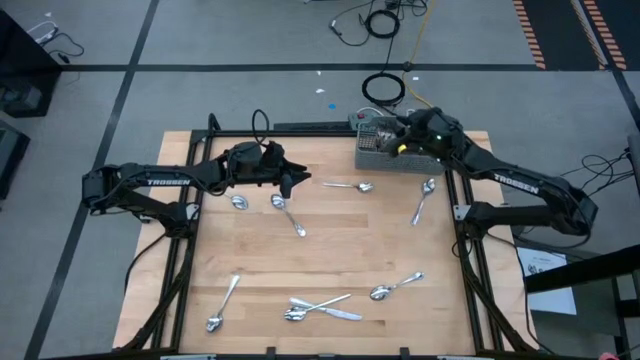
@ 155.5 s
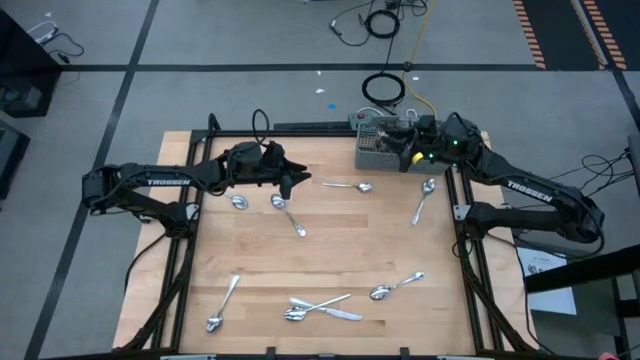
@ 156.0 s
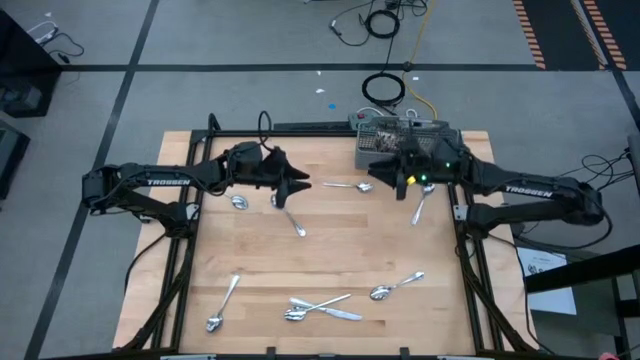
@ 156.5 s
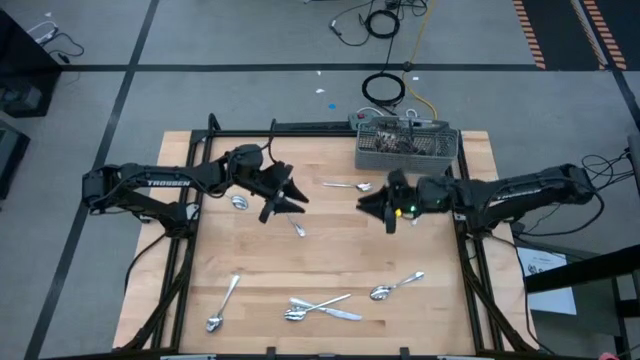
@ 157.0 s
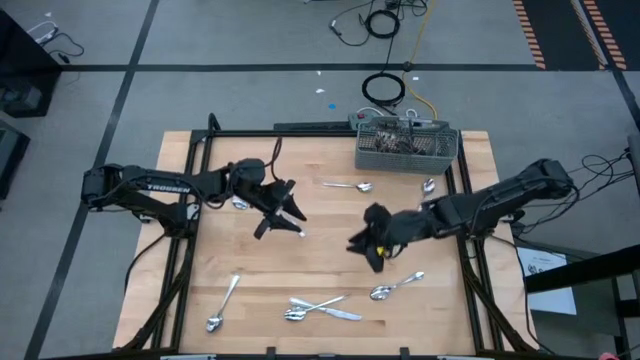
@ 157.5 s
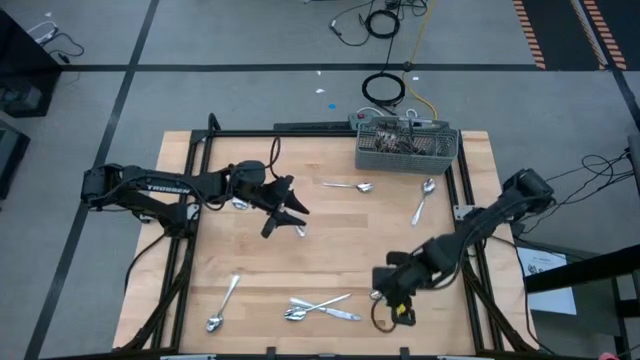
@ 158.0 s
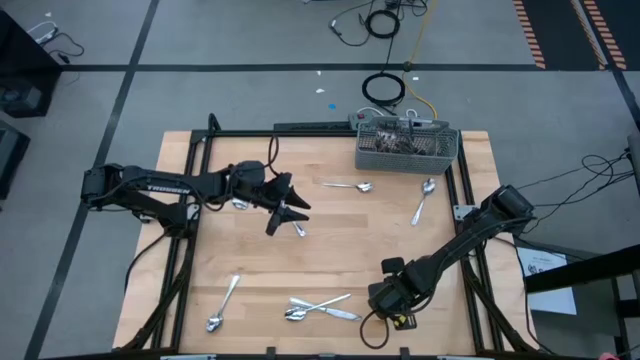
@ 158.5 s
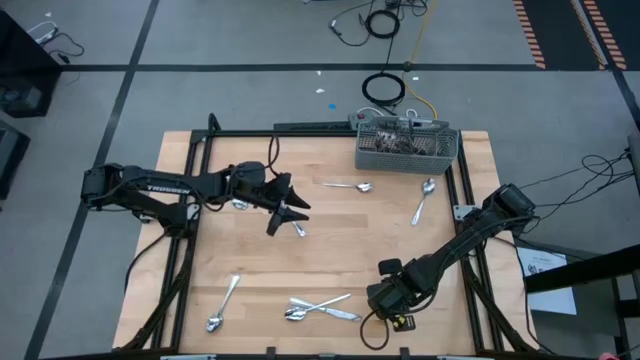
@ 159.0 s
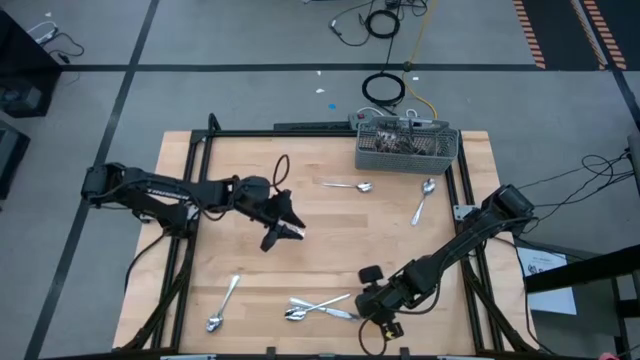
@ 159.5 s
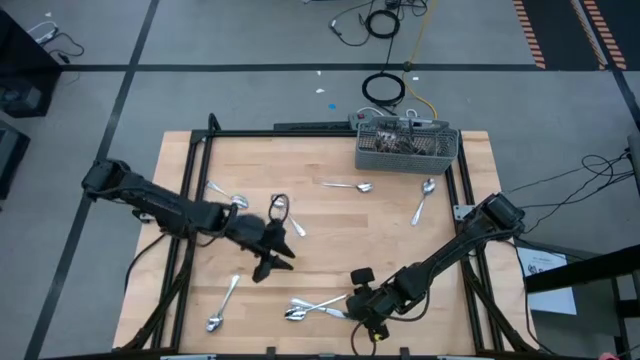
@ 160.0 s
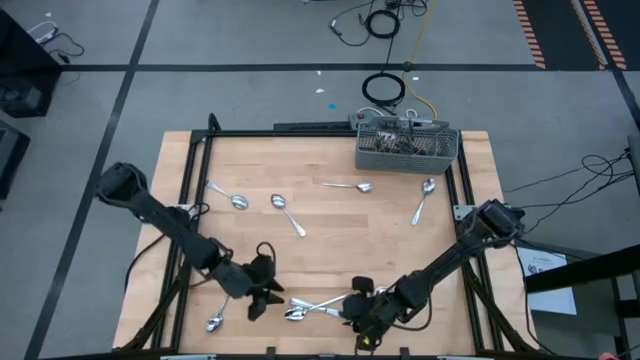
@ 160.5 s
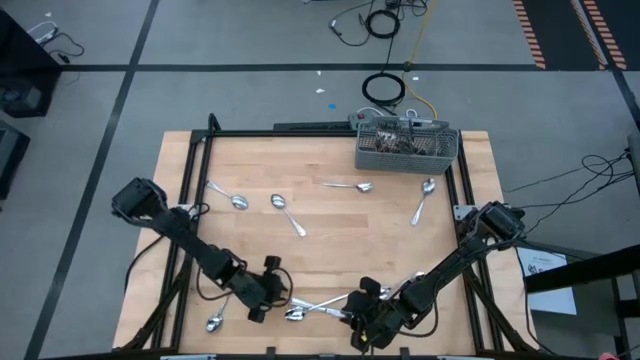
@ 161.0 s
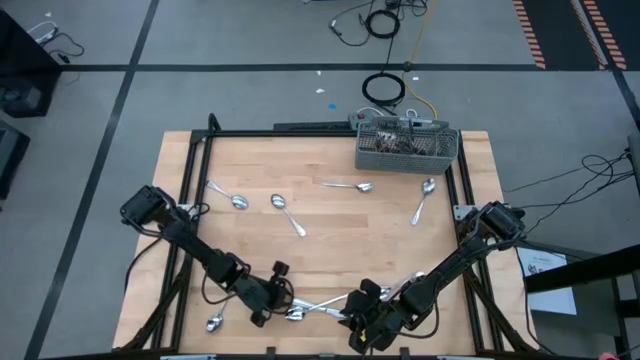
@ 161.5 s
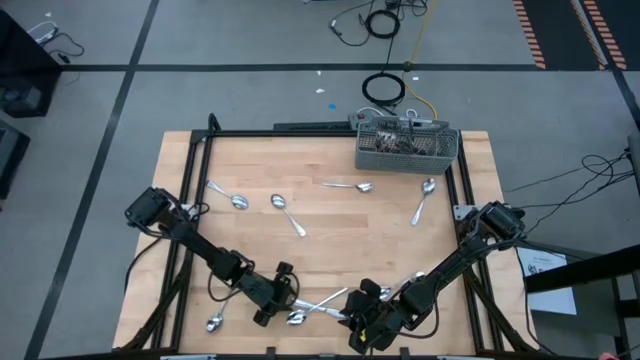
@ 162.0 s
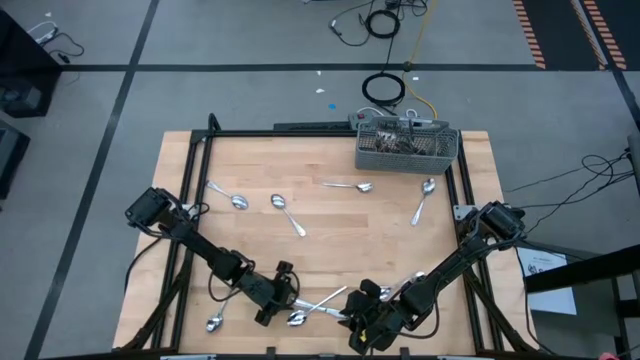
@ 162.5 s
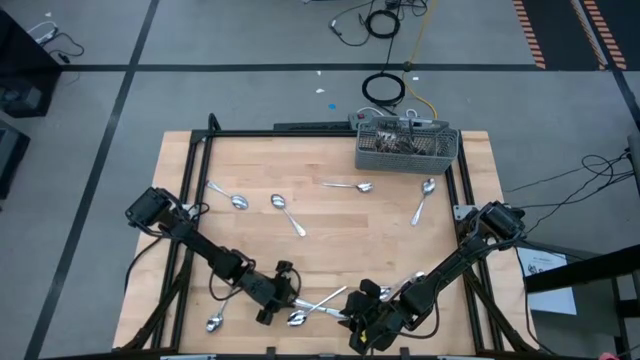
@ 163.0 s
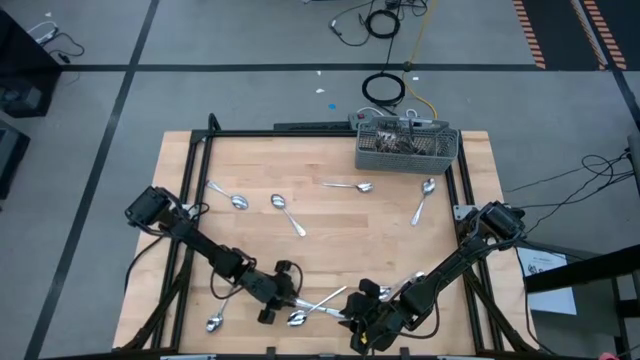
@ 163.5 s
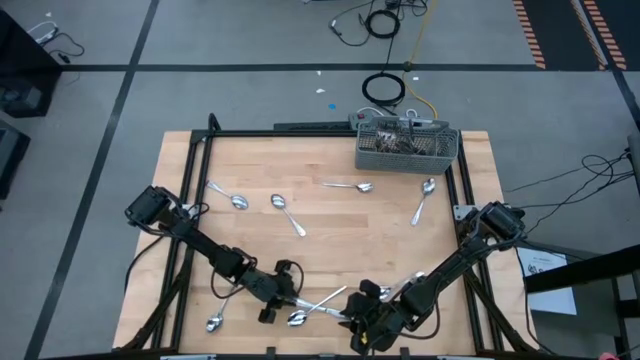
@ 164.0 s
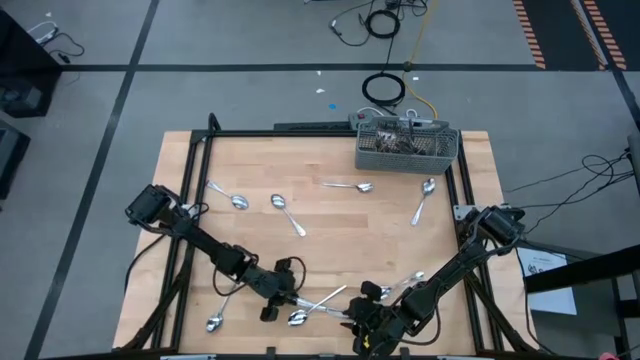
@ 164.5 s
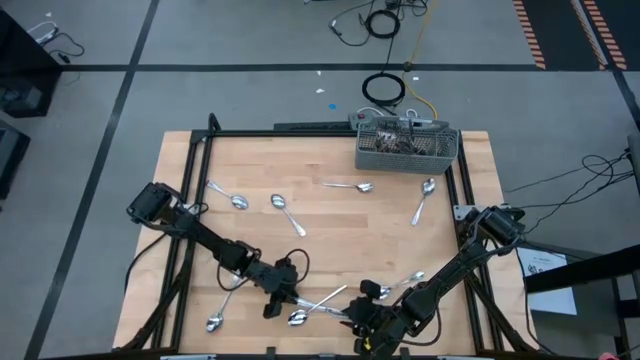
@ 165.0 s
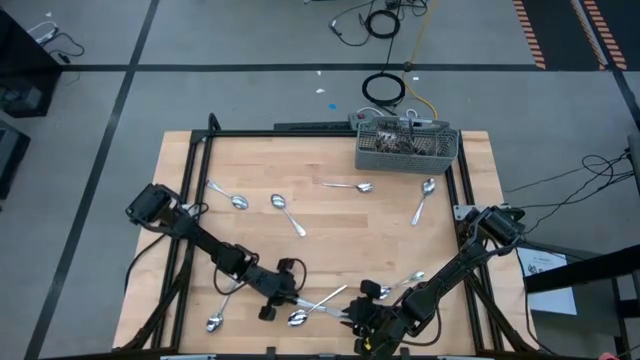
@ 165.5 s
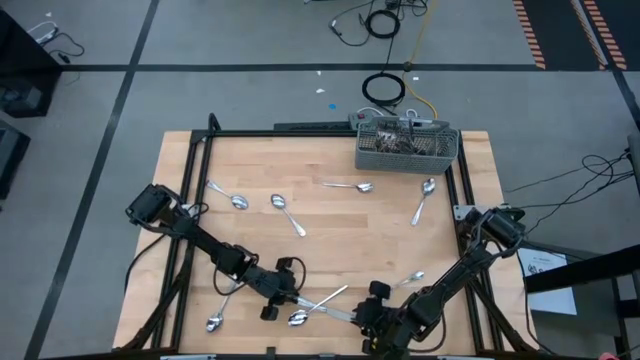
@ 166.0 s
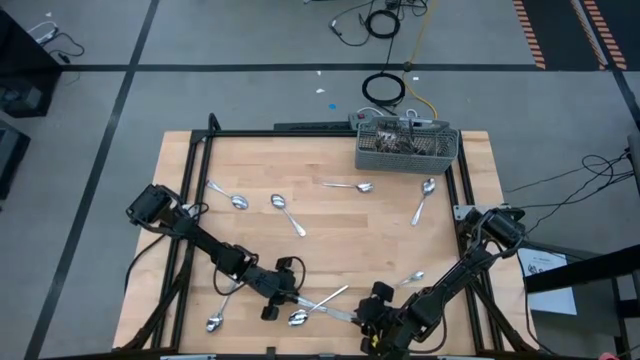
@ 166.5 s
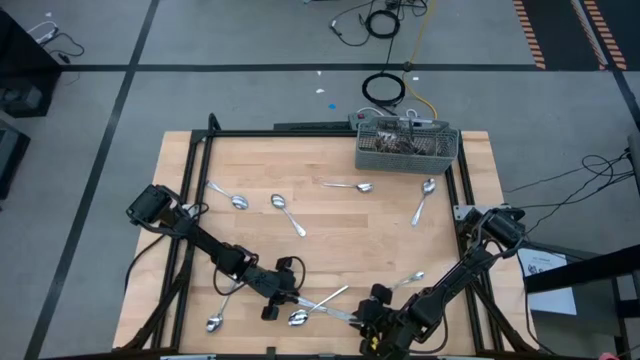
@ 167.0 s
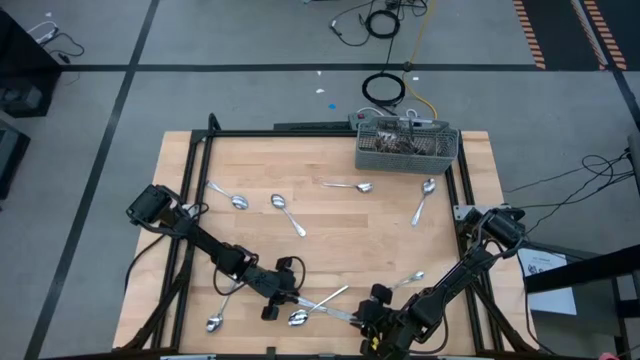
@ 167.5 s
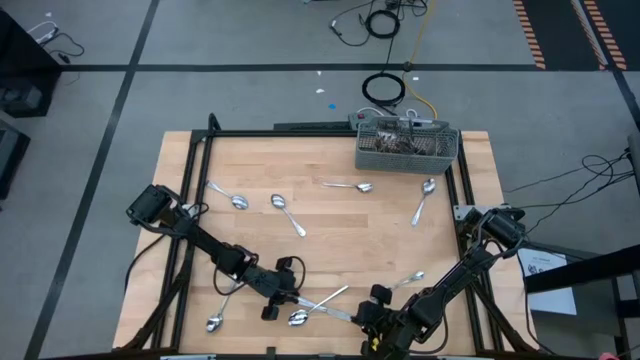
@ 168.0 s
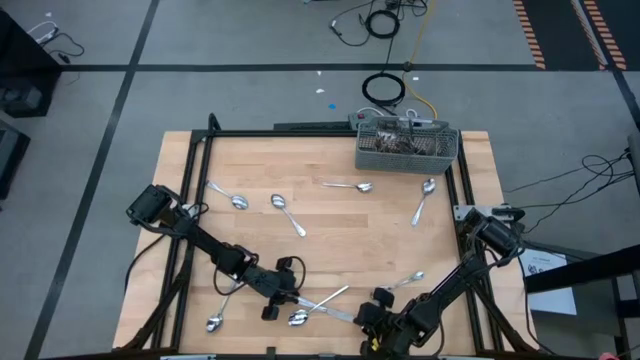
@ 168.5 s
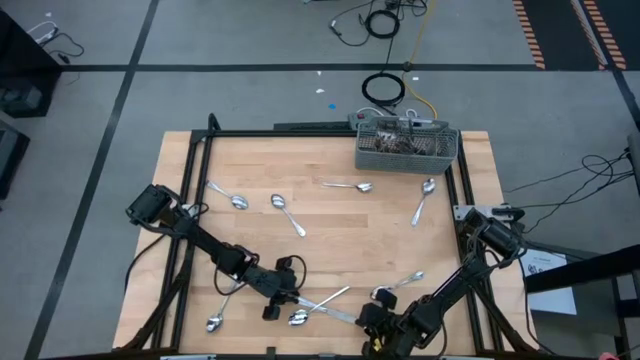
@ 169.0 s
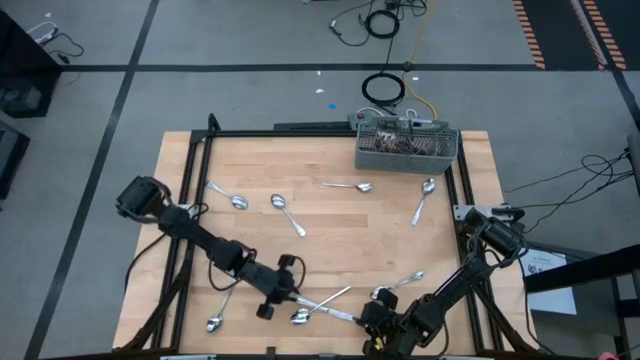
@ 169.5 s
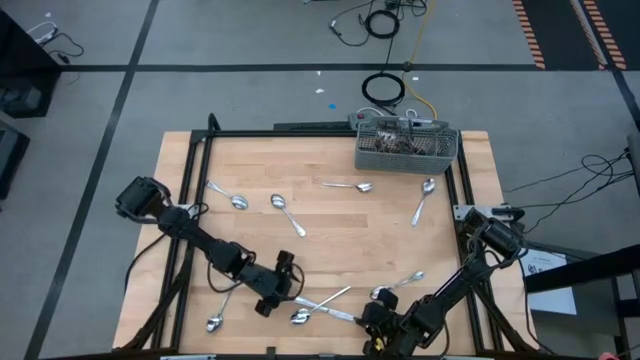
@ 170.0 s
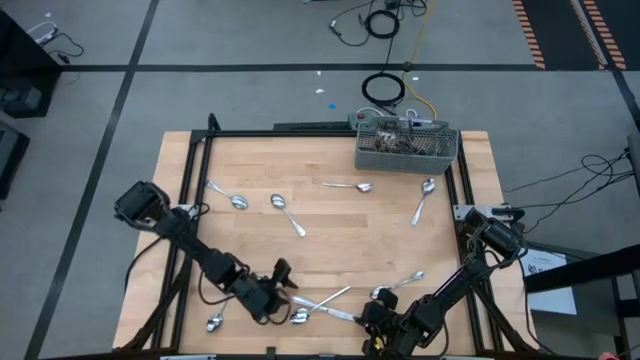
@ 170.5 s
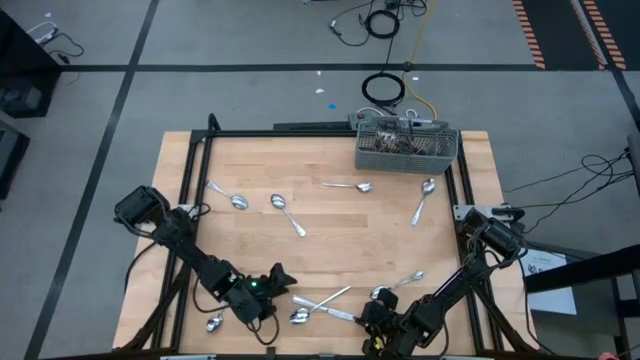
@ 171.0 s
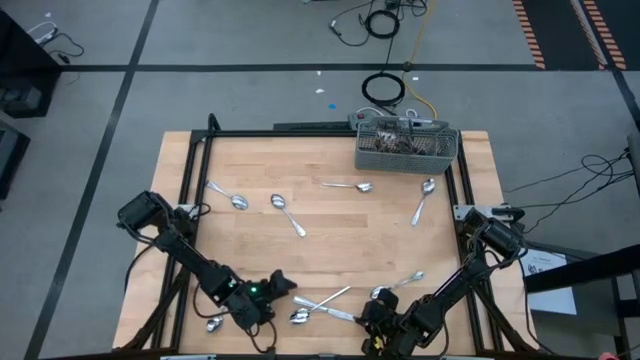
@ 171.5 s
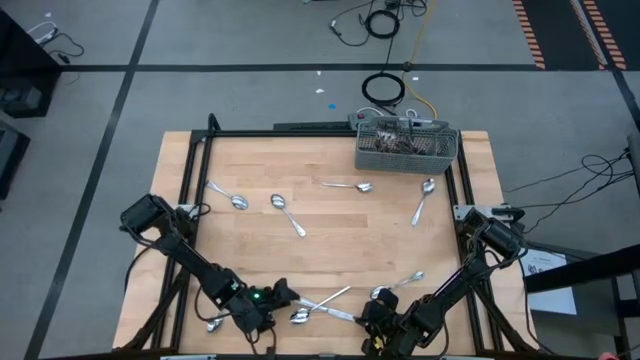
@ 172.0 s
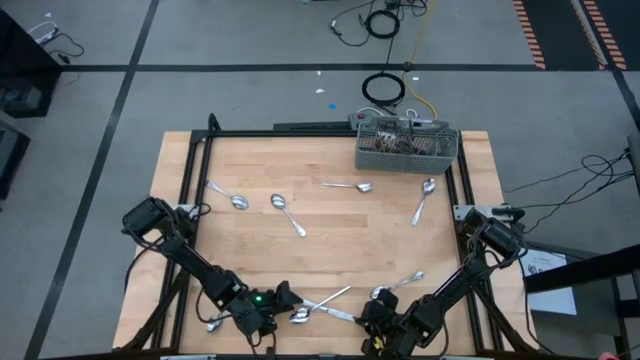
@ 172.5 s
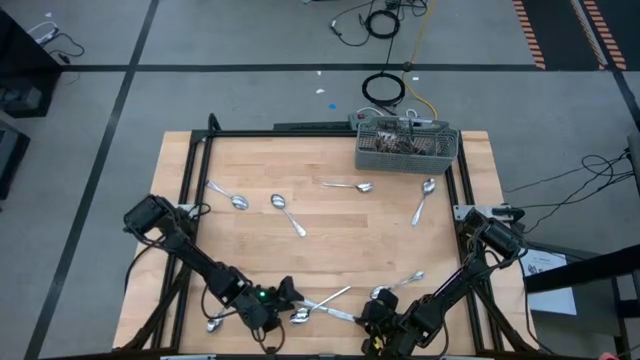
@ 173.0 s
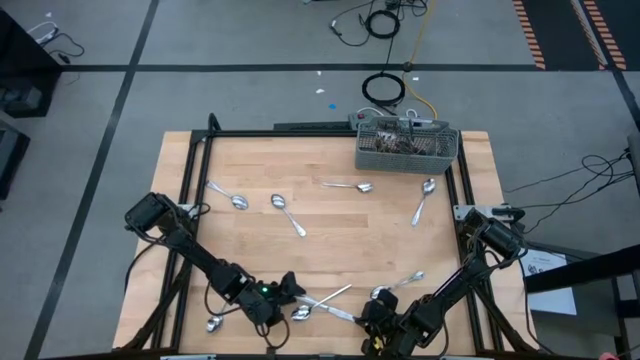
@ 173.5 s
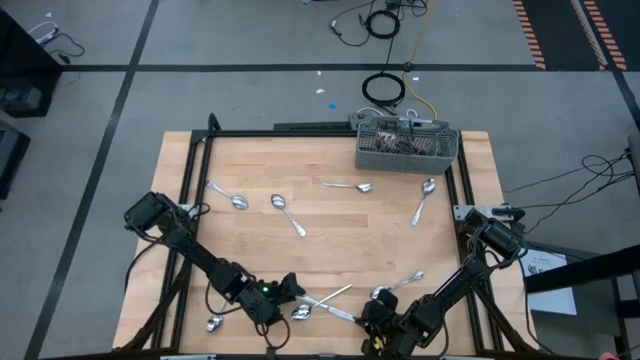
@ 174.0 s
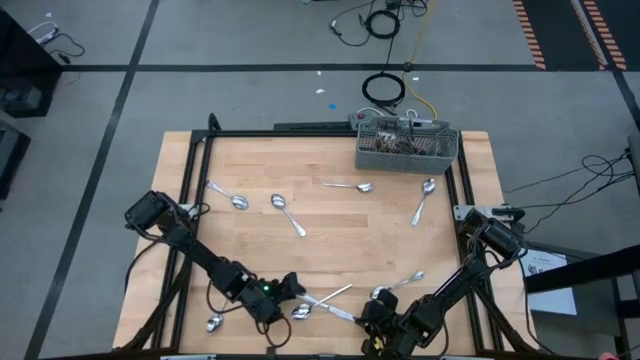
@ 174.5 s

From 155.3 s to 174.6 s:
Task: Sort silverware
Put the silver table knife into the gray utensil holder

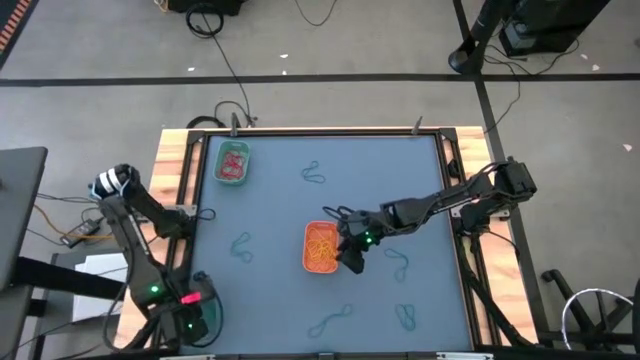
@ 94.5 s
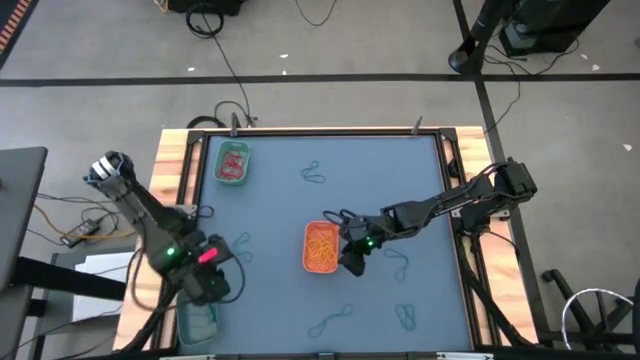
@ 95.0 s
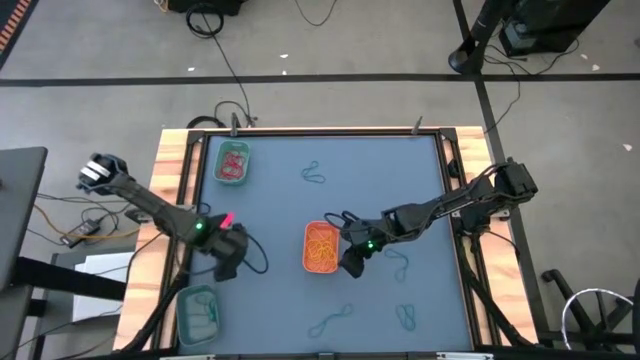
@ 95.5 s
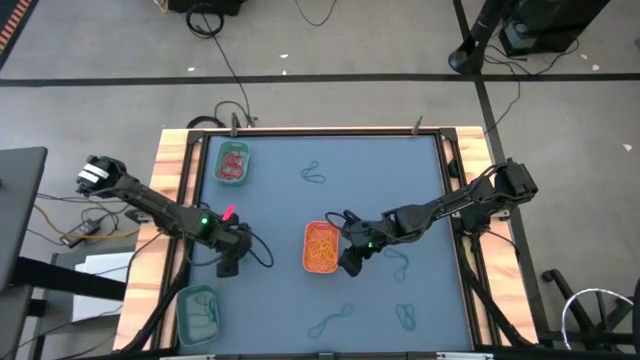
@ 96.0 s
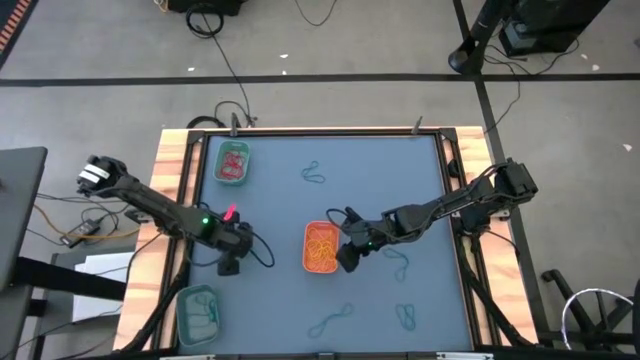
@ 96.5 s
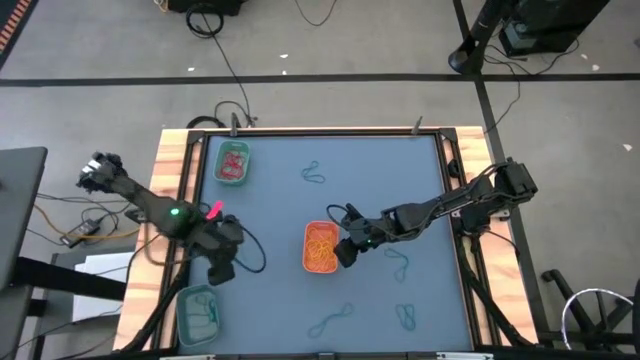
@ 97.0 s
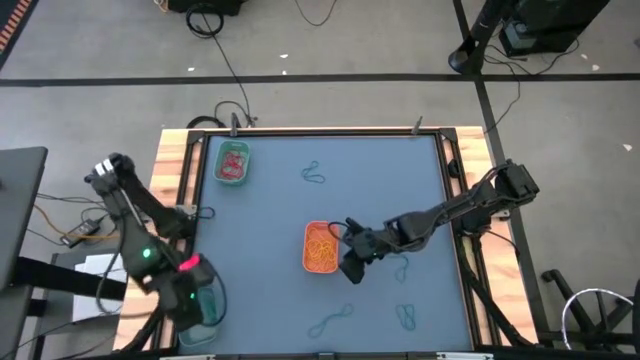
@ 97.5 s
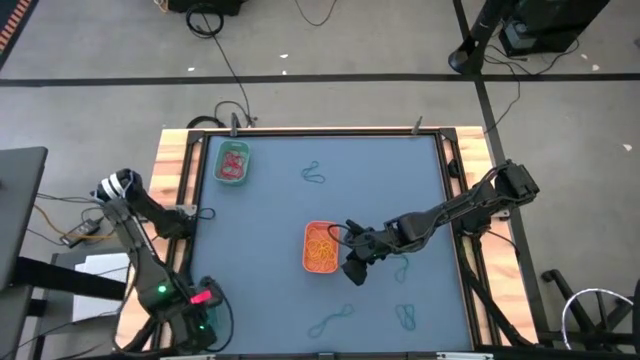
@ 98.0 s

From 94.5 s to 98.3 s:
Task: Sort rubber bands into baskets
Put the blue rubber band into the blue bin
